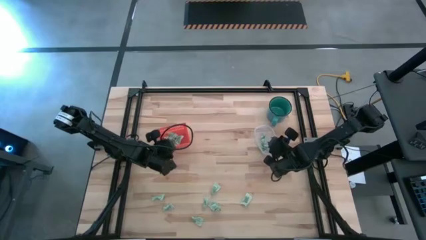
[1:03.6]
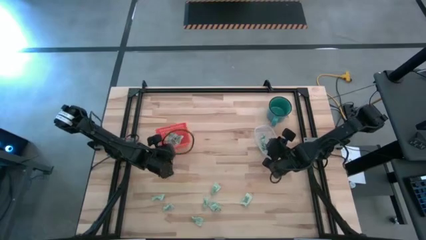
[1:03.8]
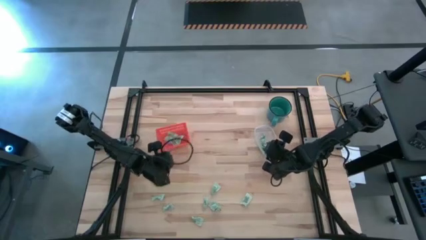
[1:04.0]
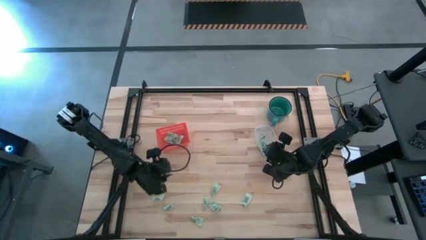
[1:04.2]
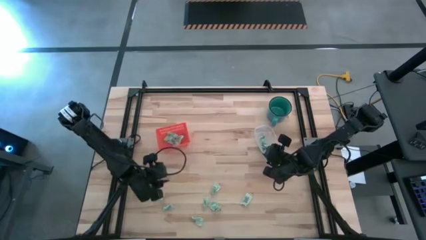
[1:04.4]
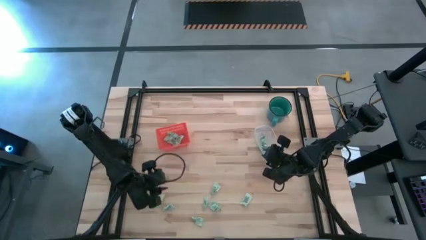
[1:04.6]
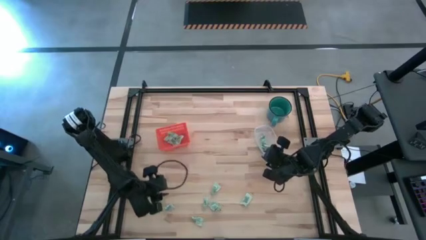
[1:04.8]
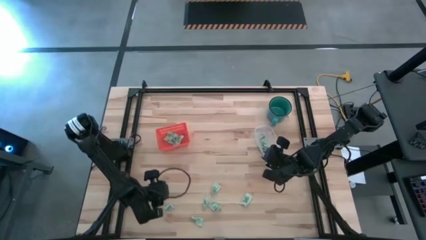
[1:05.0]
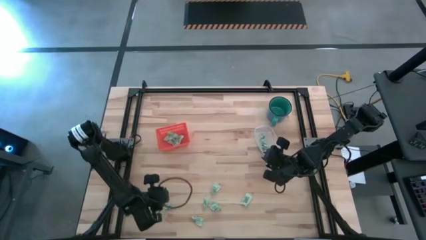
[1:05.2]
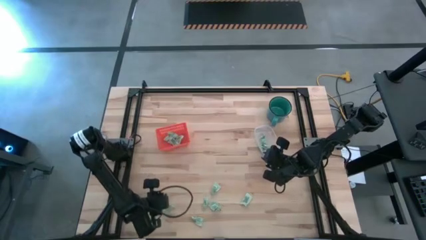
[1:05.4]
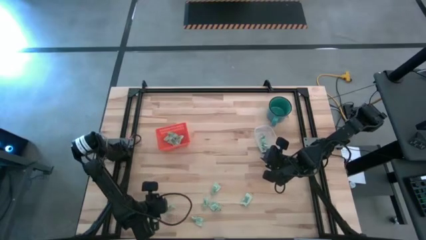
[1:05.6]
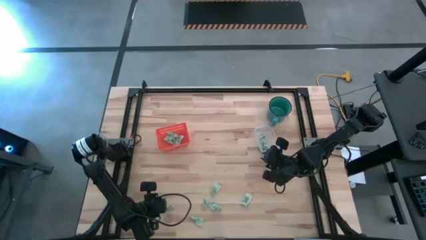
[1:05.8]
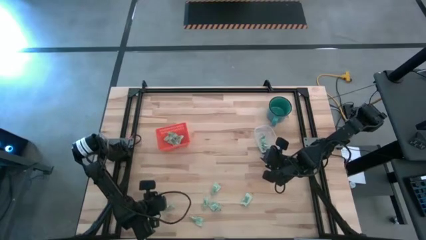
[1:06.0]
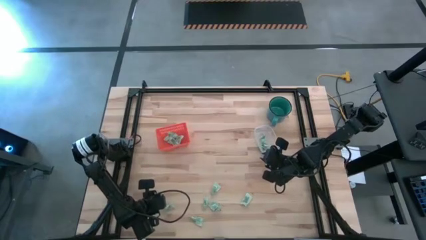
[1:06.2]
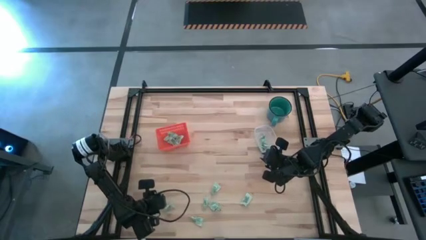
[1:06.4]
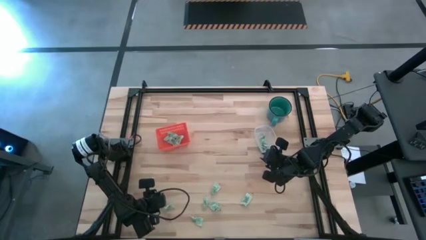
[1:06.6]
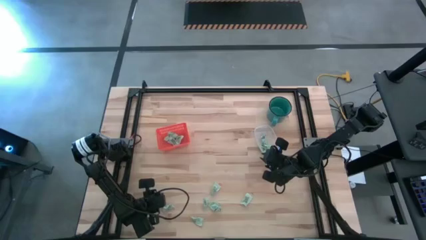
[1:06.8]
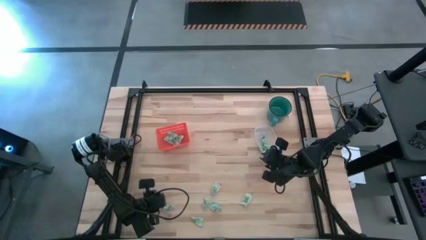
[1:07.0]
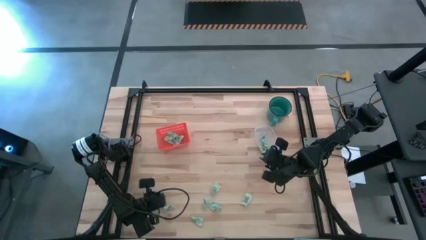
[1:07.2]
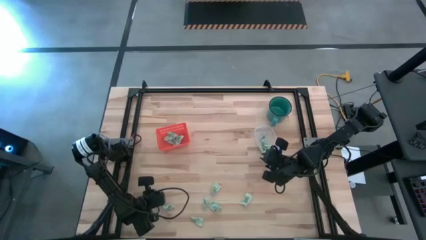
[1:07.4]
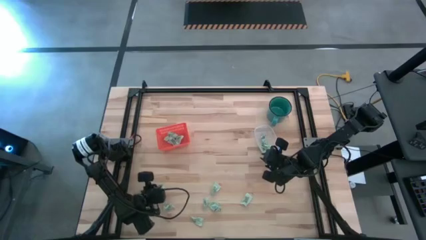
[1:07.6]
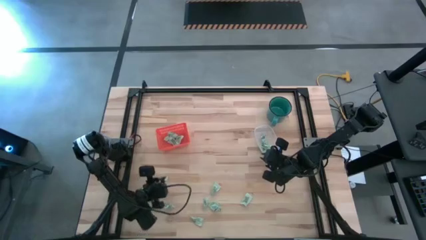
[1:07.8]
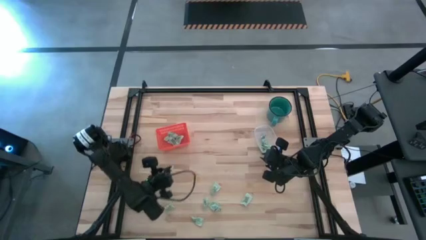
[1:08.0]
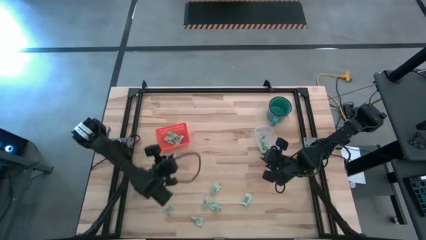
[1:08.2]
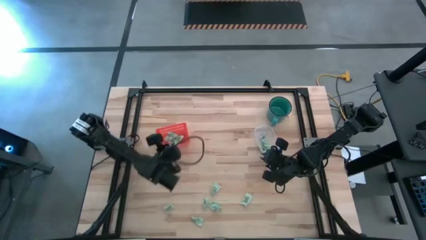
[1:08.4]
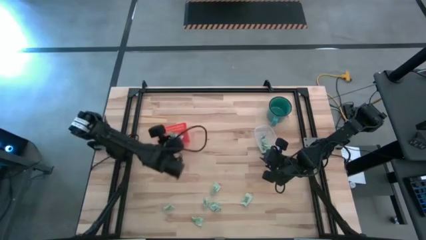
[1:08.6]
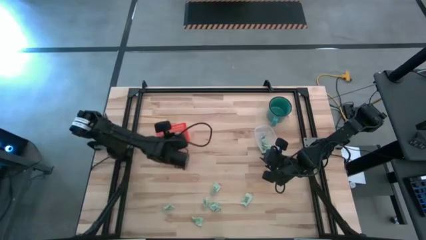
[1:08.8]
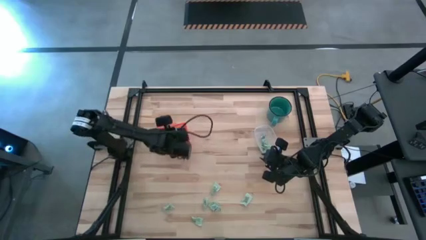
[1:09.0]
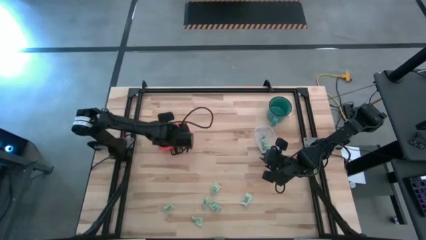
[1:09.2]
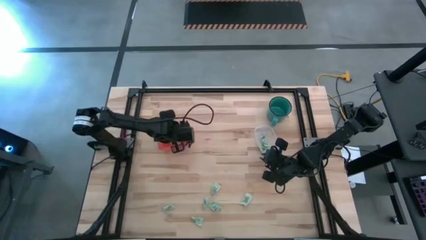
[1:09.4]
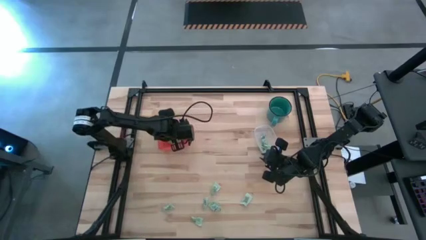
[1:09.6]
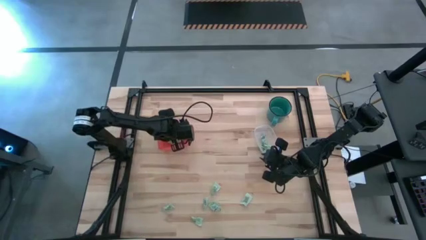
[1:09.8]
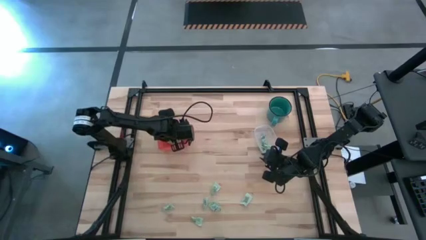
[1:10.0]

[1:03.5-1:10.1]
Task: Pick and place items into bin
Put the stevia packet into the orange bin

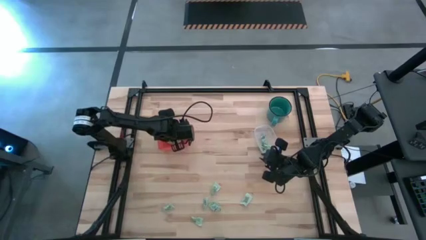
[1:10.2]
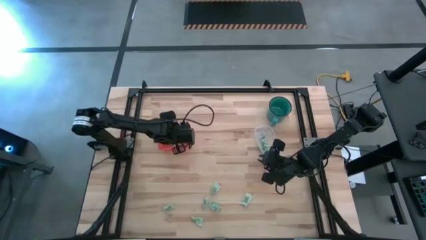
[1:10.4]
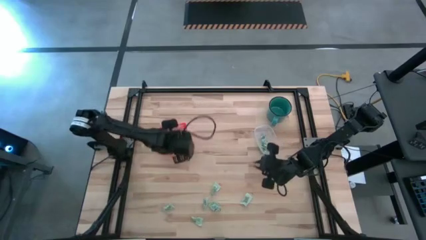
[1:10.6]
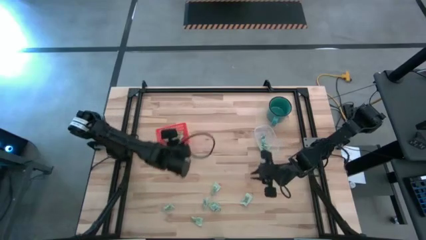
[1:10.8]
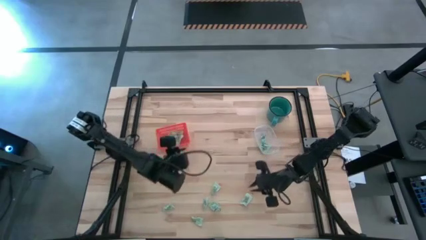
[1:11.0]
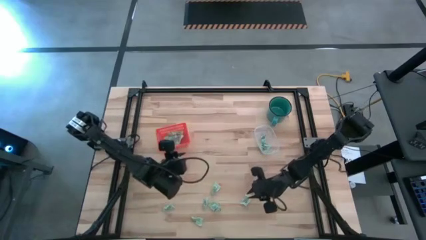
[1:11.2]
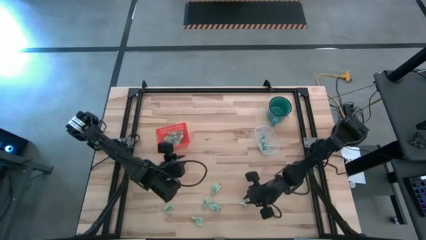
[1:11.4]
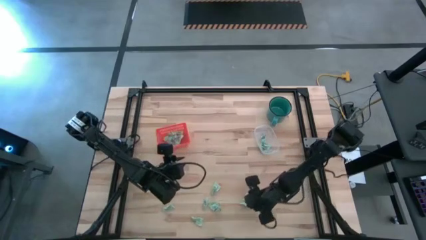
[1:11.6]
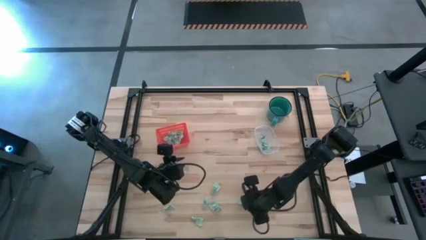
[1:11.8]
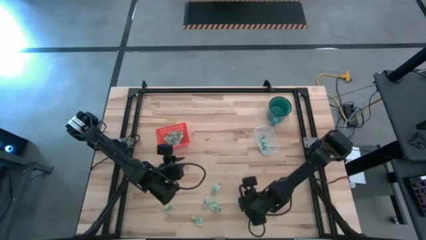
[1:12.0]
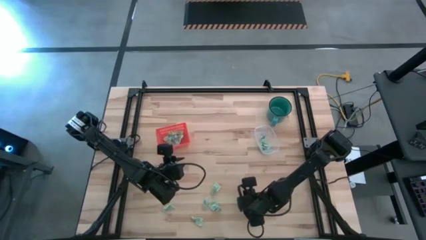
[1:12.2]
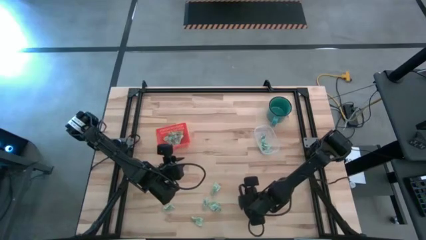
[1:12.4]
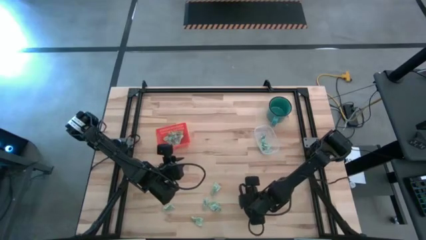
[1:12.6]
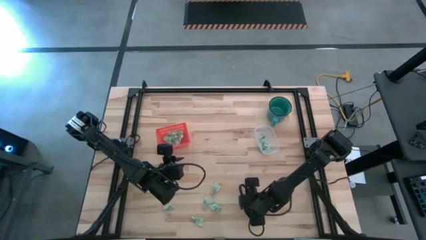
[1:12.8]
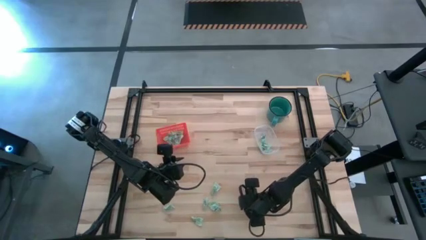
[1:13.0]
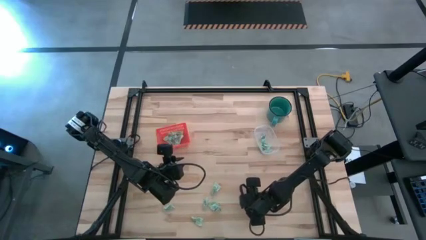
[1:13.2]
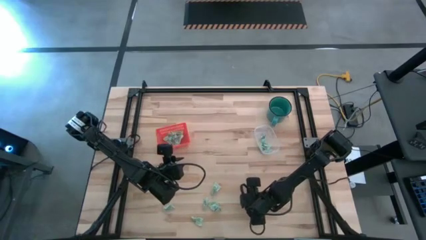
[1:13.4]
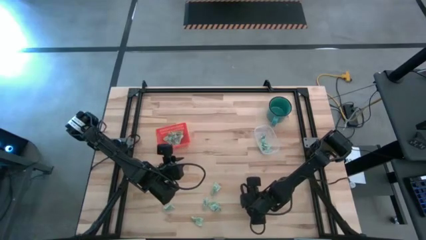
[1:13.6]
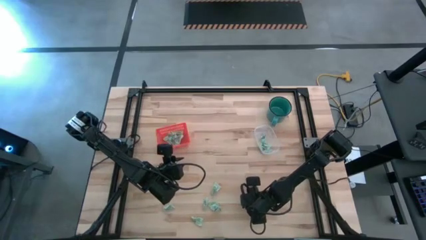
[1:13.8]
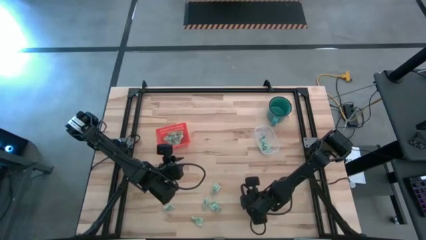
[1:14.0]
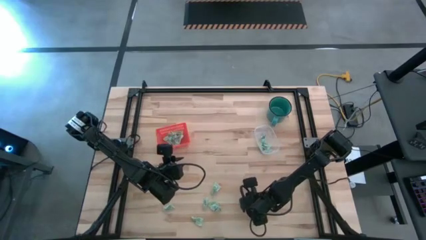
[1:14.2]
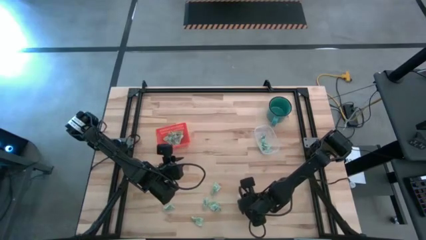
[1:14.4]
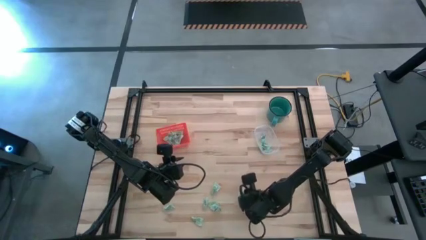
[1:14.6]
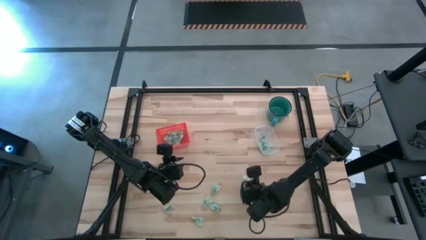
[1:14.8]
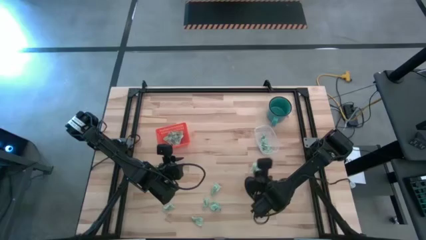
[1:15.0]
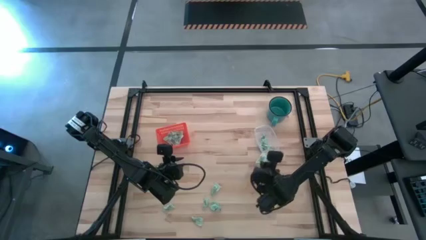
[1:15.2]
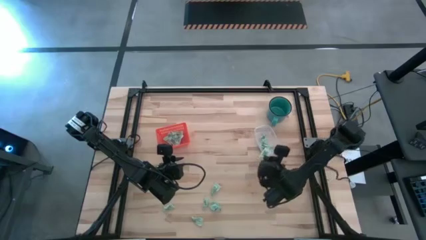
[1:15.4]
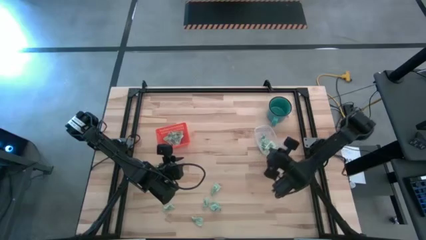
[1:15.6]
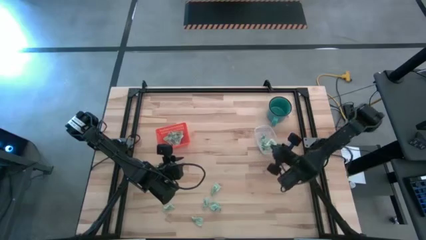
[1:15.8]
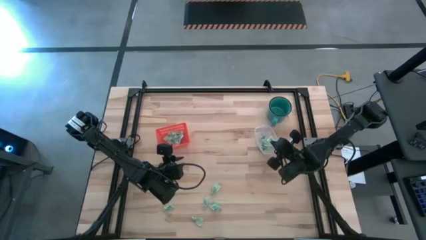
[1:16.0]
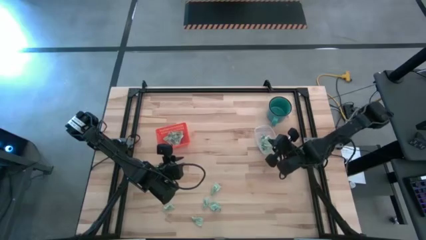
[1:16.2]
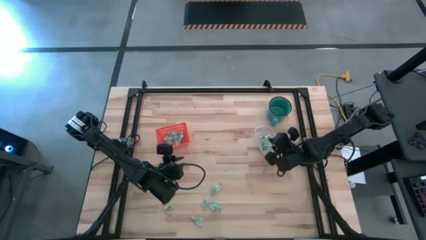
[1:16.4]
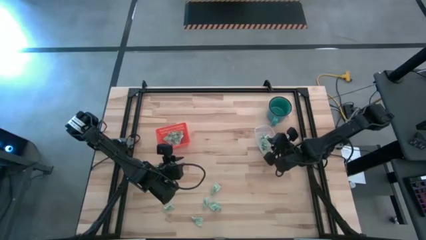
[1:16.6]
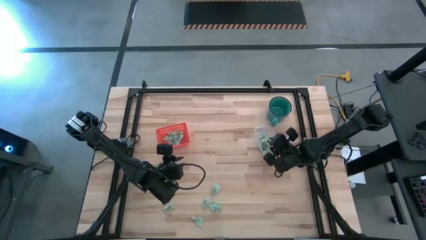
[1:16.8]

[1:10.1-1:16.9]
Put the stevia packet into the transparent container

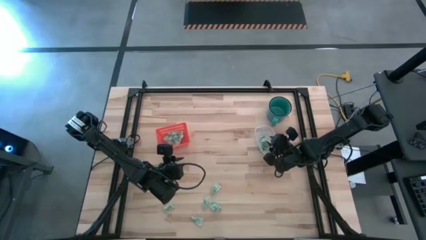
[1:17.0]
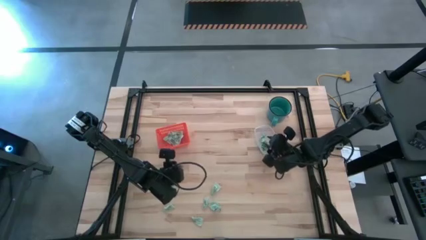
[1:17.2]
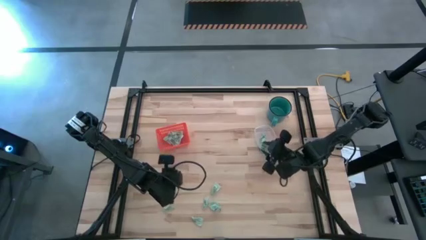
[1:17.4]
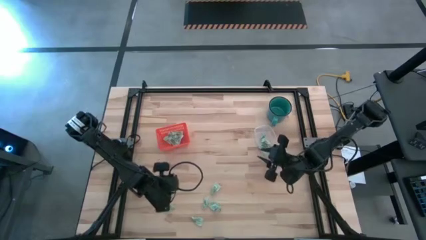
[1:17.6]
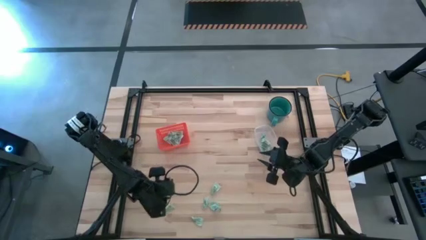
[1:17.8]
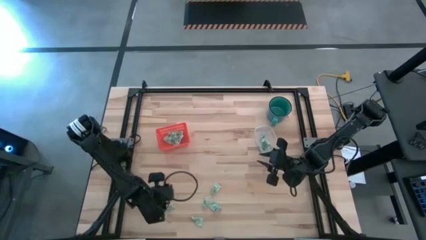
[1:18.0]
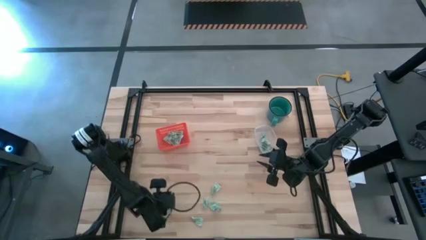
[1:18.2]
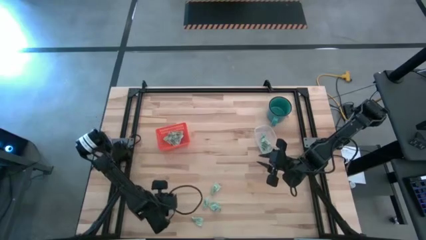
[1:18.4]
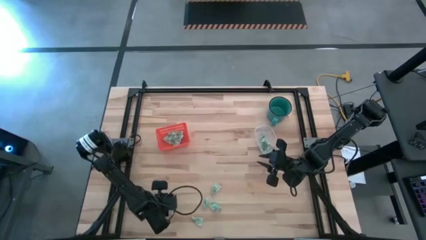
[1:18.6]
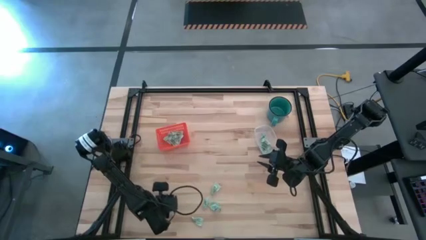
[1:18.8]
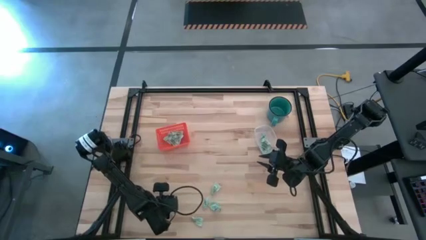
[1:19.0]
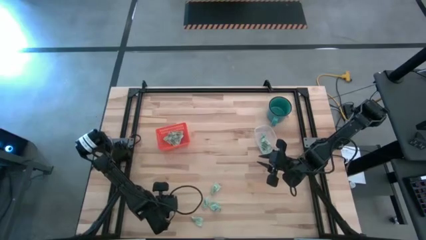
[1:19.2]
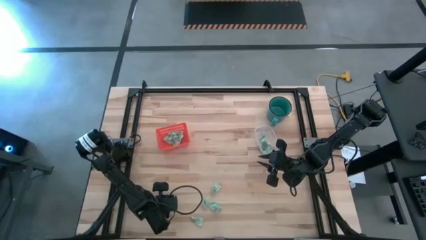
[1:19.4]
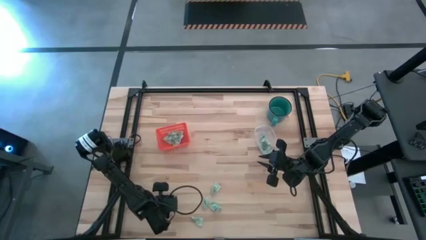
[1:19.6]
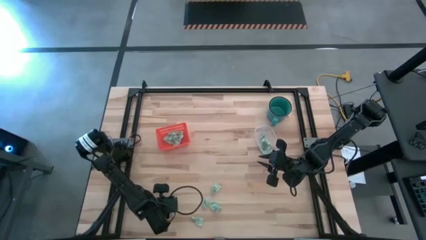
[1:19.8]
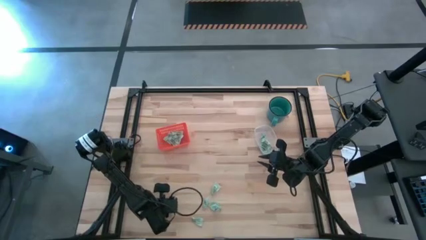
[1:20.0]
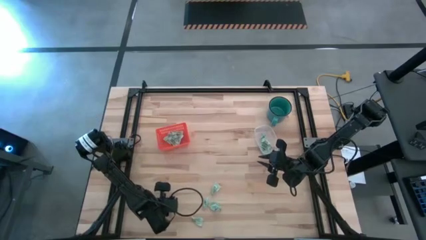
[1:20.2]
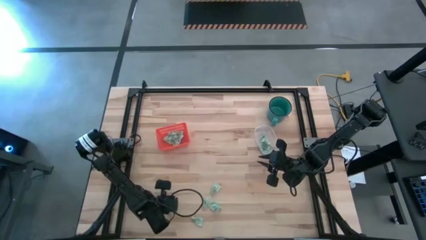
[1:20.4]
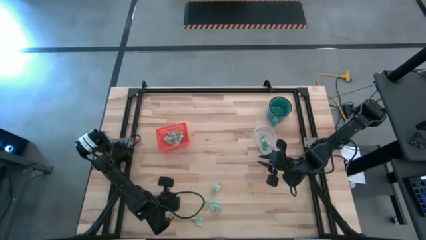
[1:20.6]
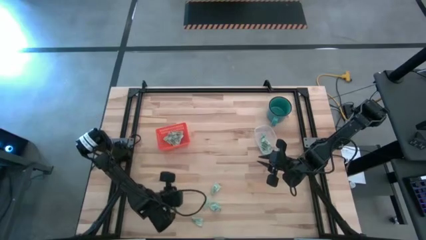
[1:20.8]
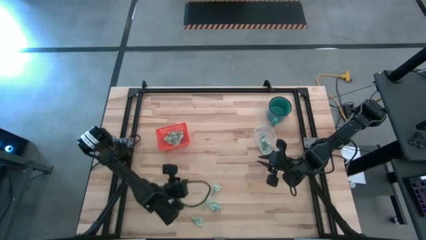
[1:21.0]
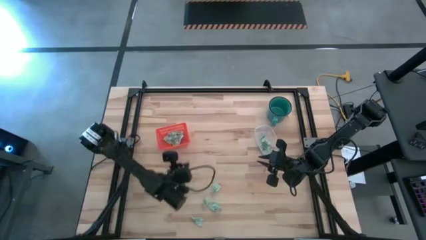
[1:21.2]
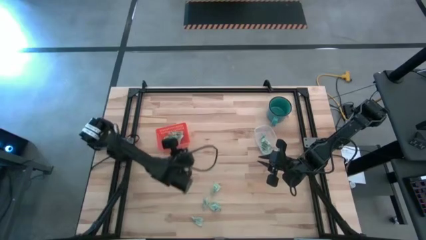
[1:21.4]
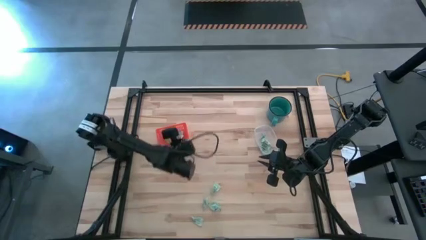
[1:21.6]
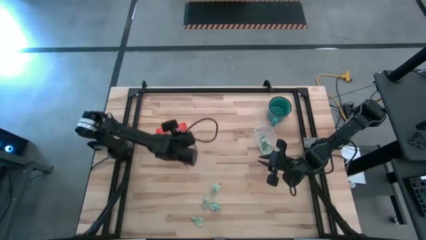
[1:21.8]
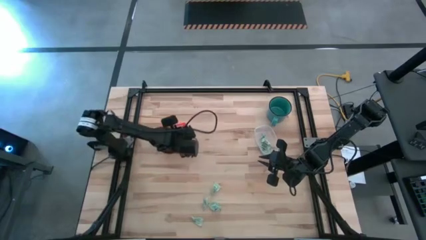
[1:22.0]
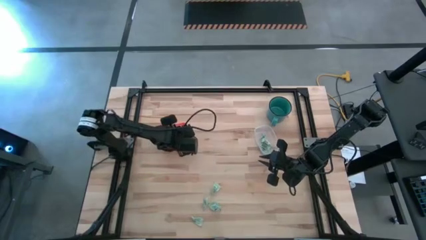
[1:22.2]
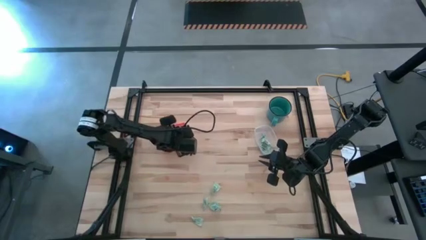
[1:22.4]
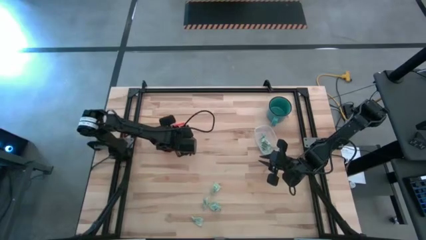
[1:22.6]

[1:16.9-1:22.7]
Put the stevia packet into the orange bin
